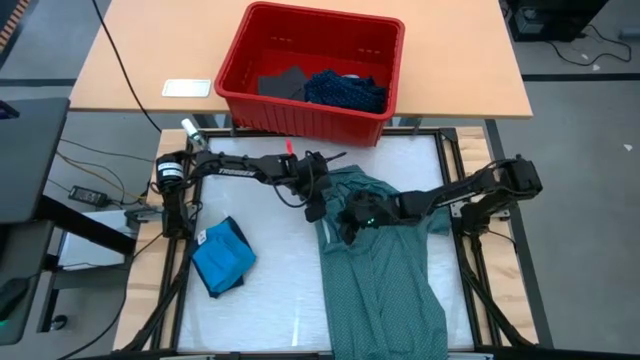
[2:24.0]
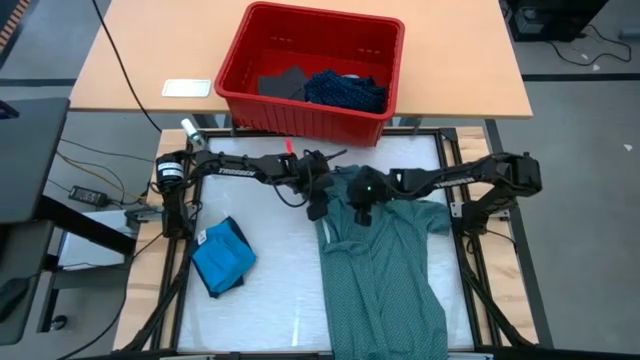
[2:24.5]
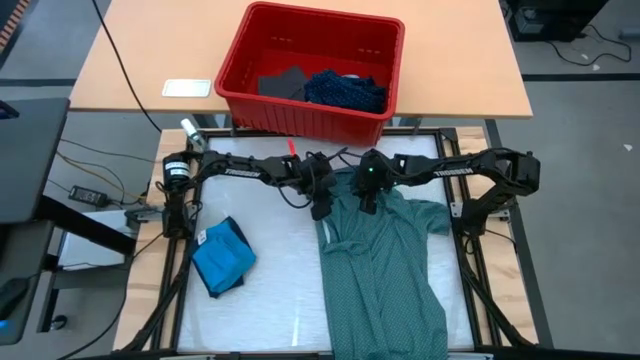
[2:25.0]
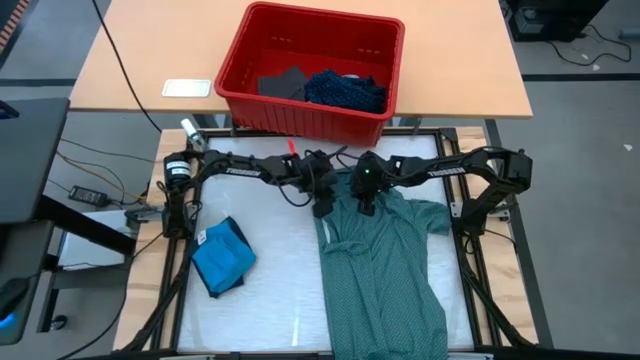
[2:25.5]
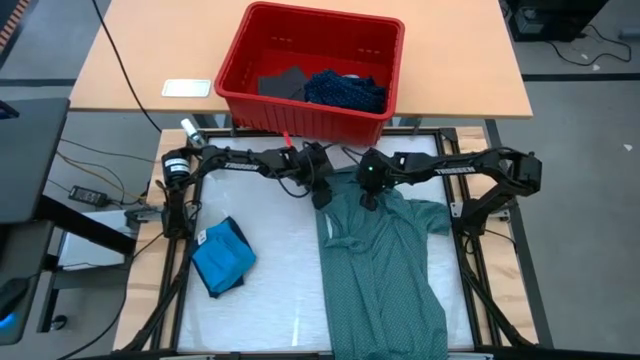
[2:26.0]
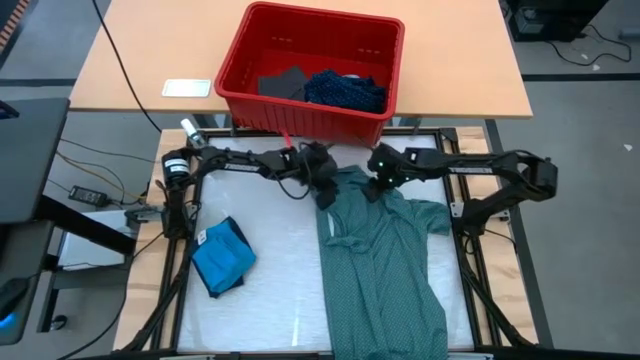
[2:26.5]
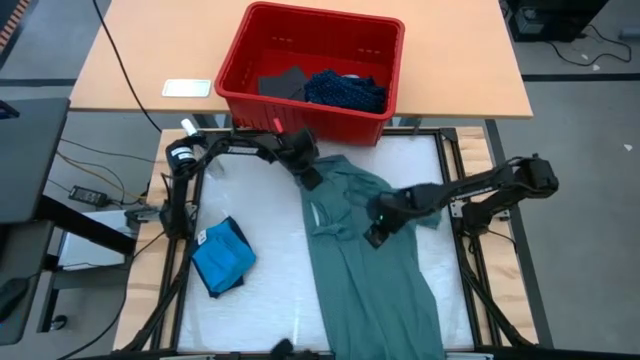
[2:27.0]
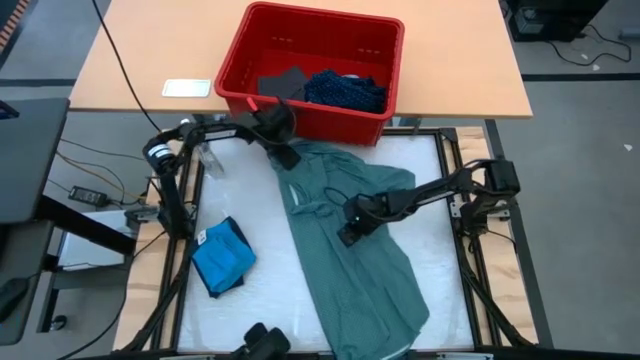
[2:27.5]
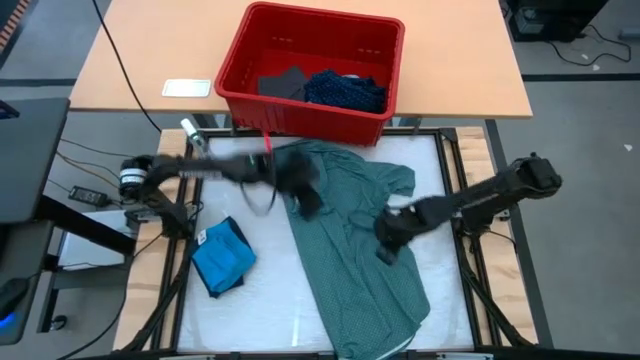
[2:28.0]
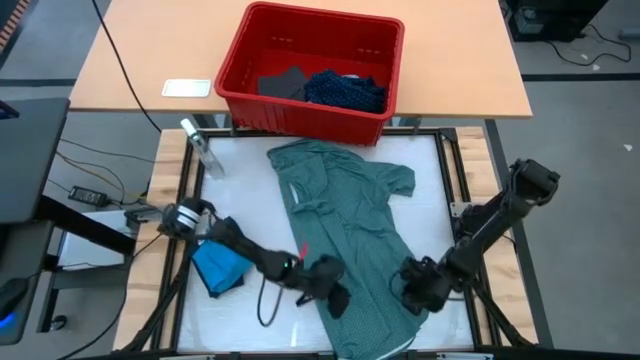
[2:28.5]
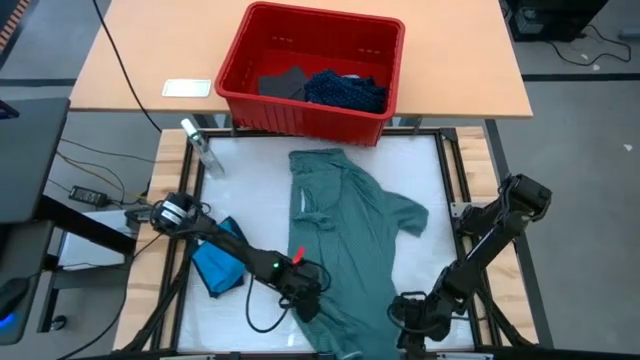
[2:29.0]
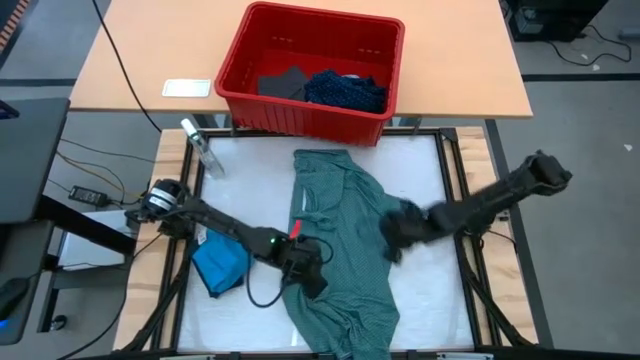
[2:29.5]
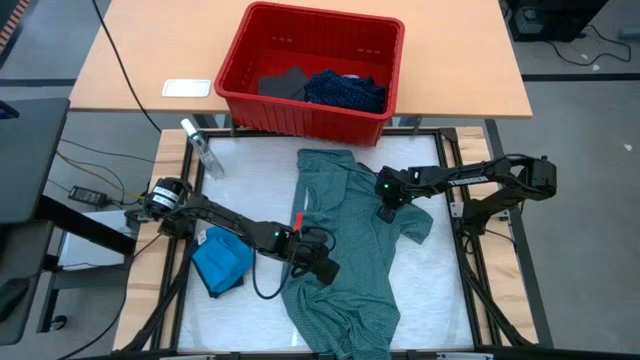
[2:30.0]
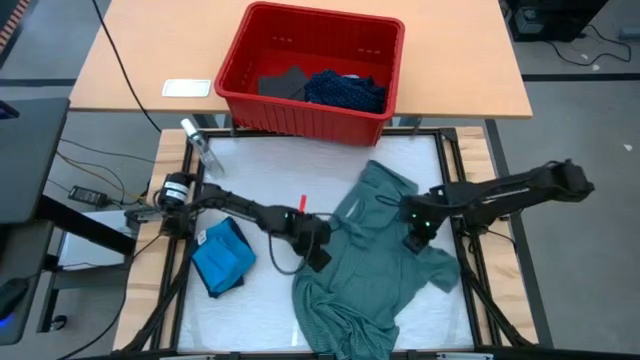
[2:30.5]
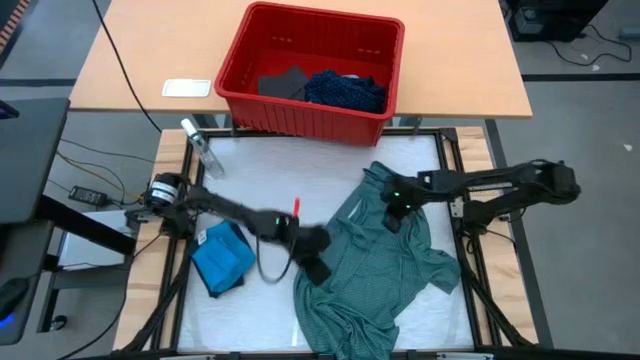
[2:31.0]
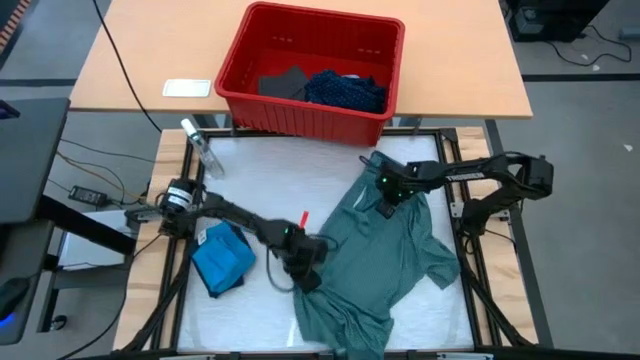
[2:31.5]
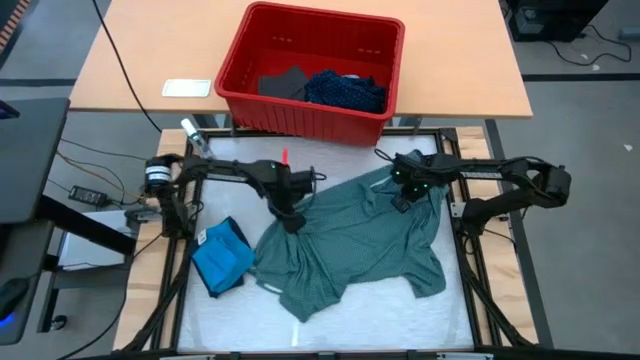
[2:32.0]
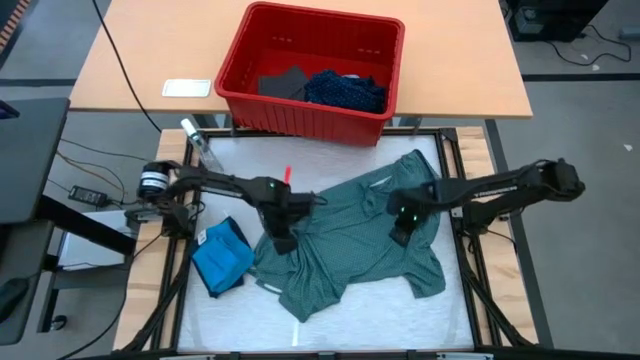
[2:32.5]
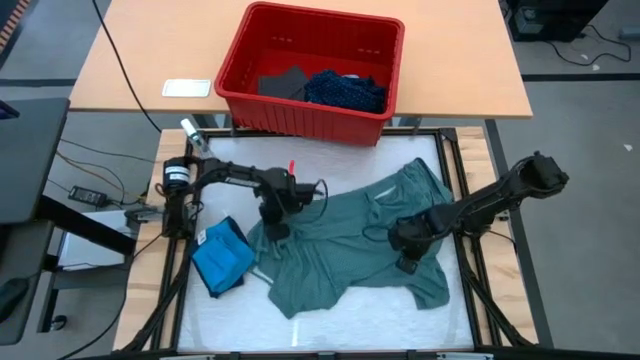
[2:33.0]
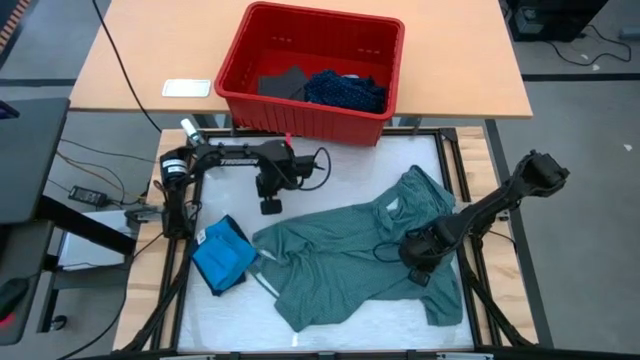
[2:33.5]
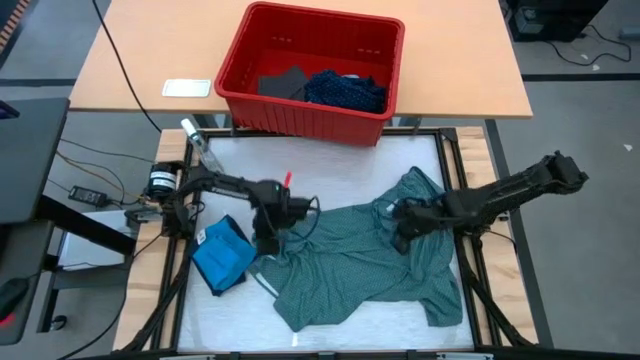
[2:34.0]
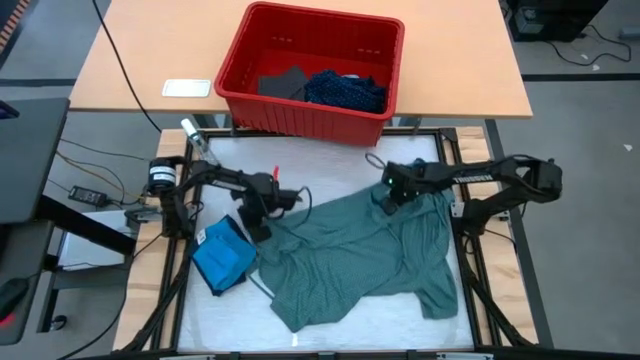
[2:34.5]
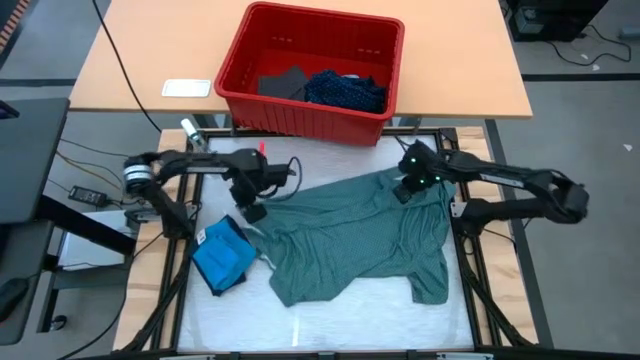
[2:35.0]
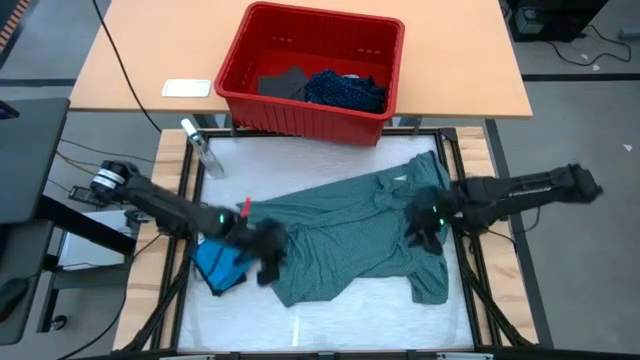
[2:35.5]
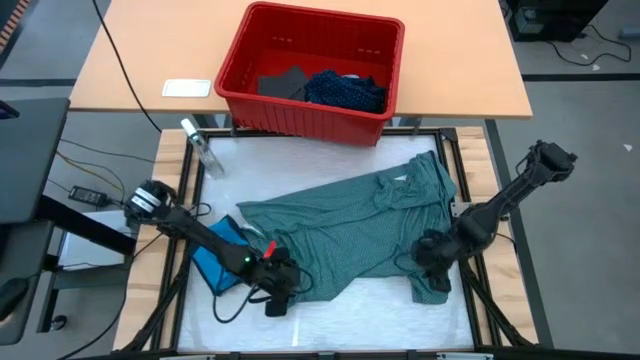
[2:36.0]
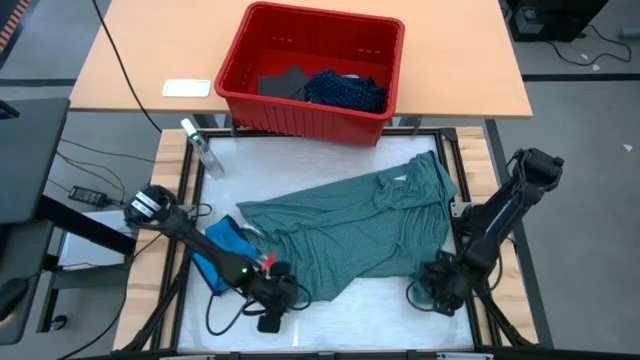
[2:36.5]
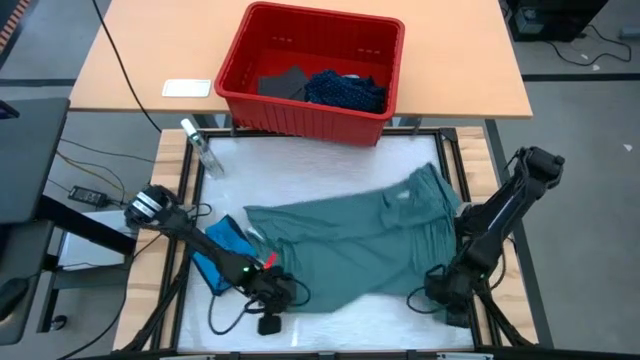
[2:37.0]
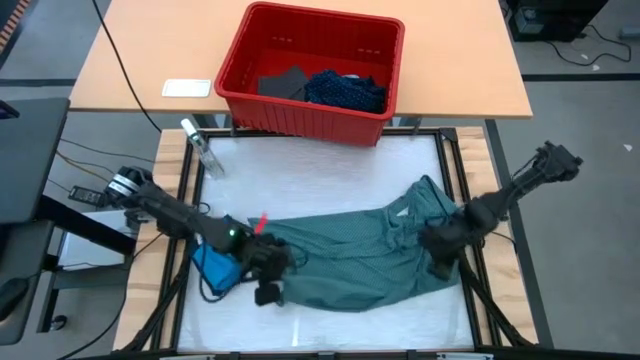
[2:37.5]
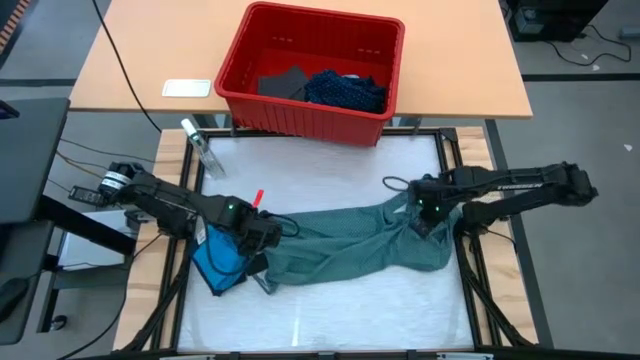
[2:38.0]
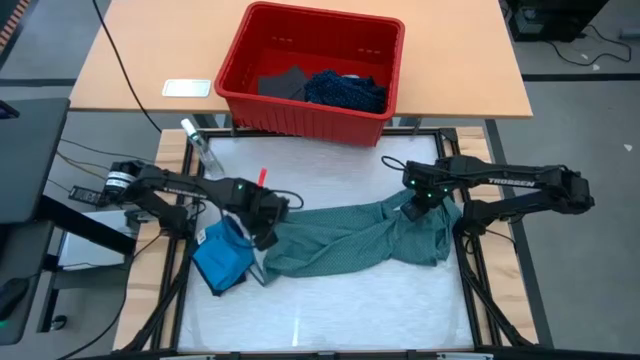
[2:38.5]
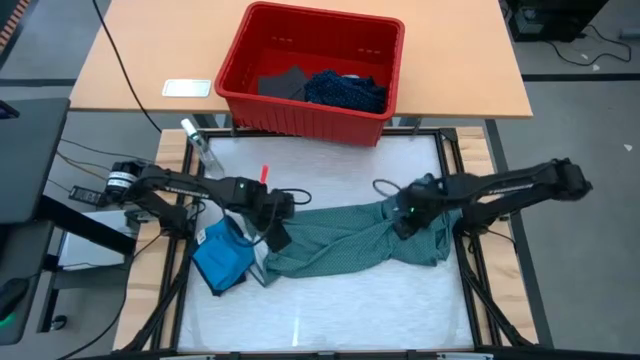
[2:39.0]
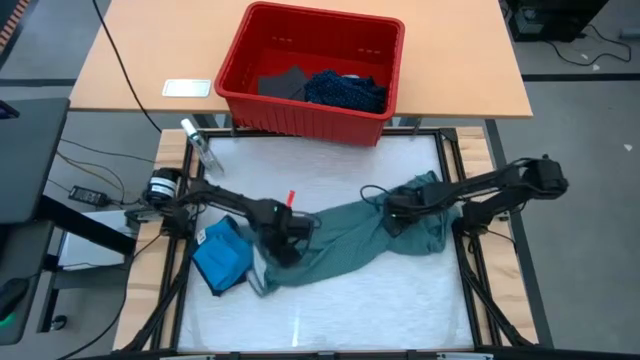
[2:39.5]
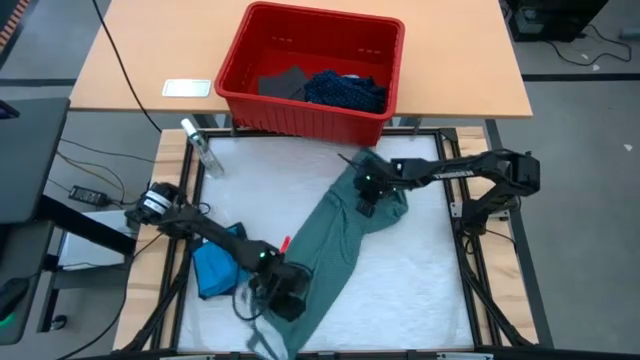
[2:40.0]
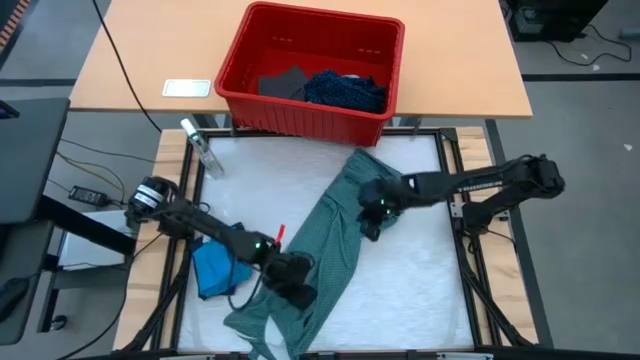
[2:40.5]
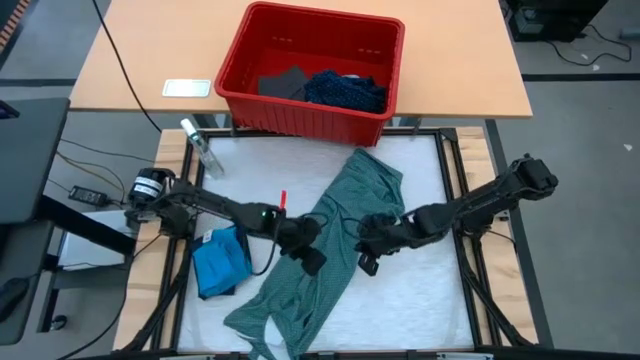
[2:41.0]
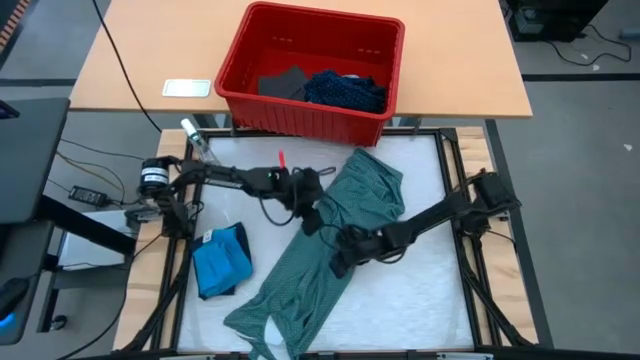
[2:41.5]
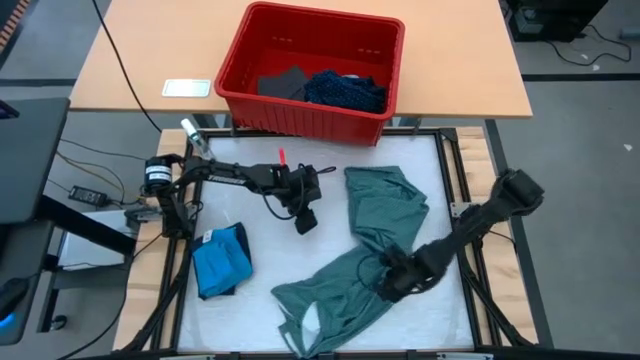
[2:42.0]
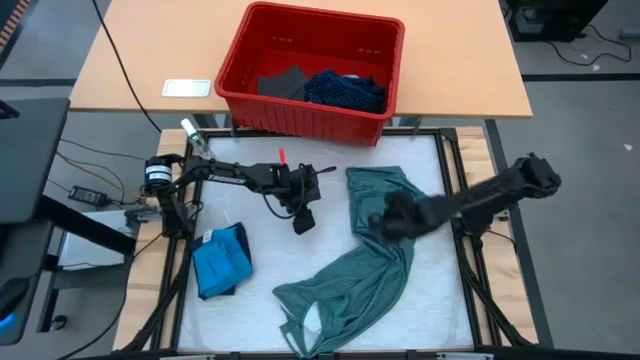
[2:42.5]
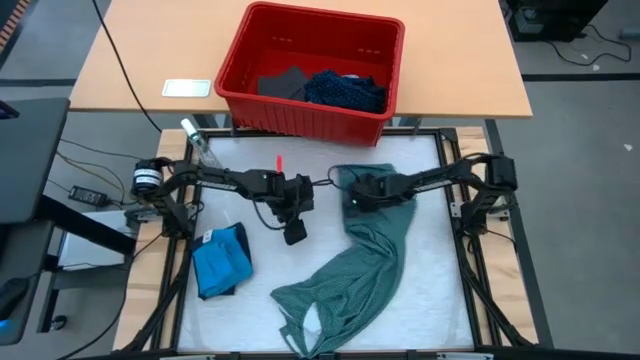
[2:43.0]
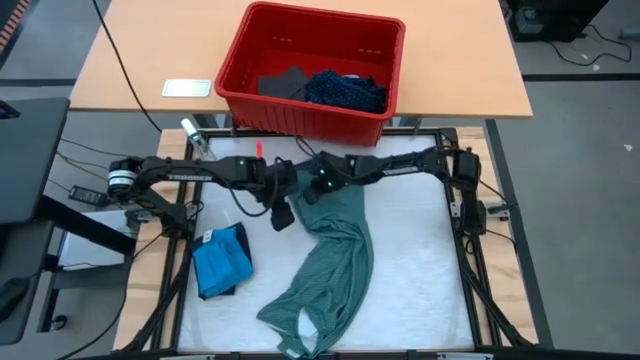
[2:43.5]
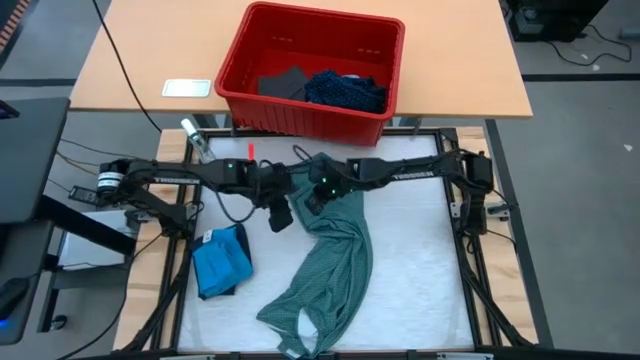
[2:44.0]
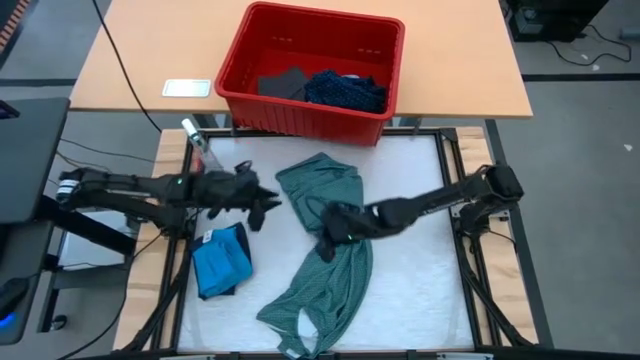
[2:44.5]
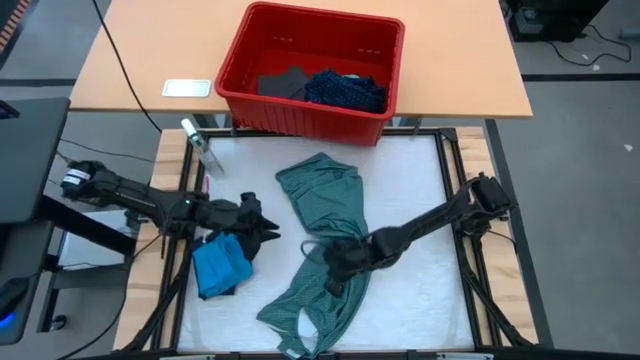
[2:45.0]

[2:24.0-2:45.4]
Task: Fold laundry
Fold the green polo shirt
